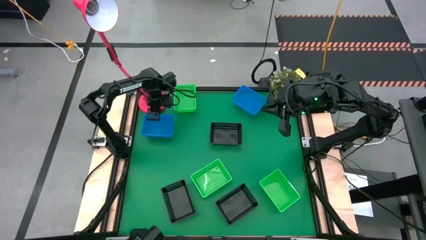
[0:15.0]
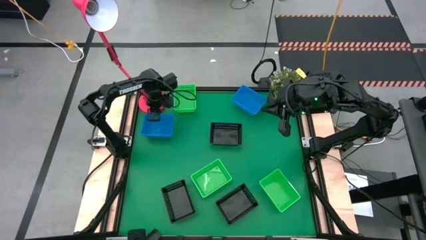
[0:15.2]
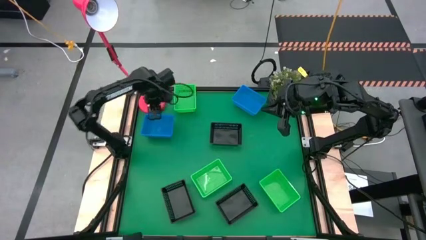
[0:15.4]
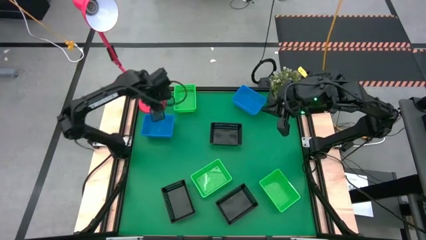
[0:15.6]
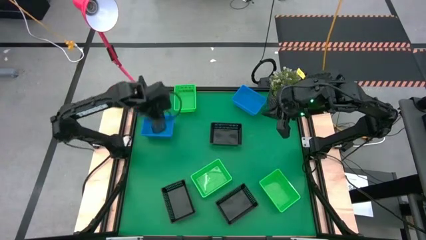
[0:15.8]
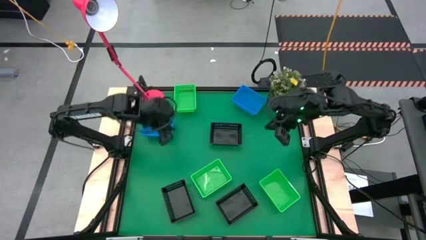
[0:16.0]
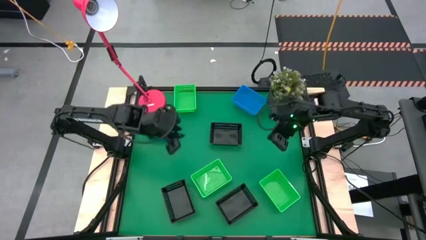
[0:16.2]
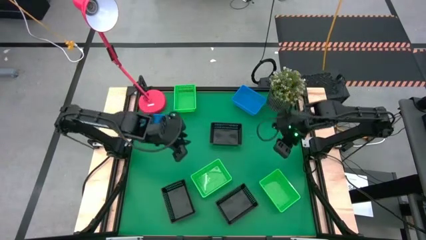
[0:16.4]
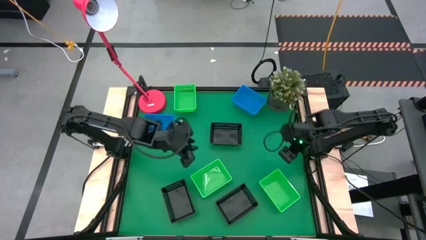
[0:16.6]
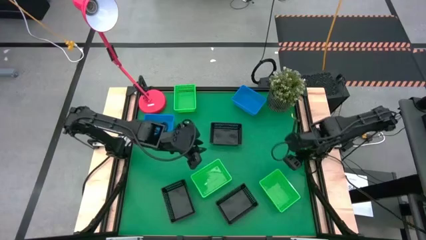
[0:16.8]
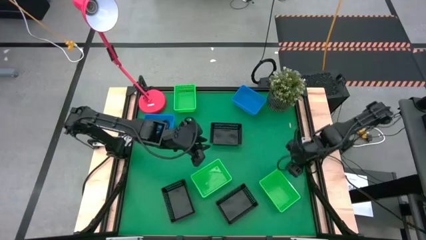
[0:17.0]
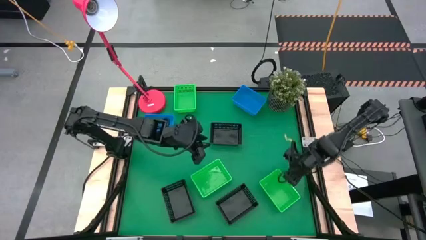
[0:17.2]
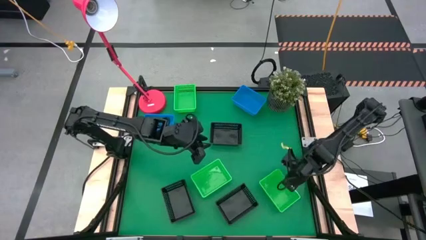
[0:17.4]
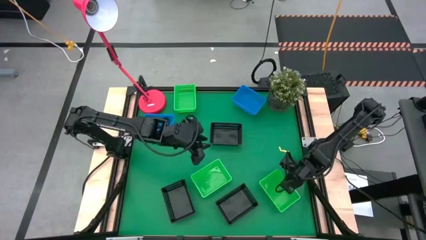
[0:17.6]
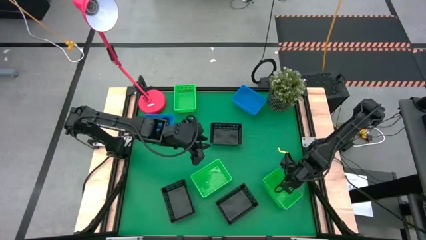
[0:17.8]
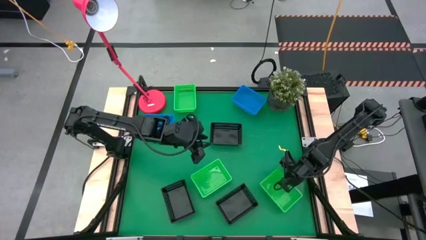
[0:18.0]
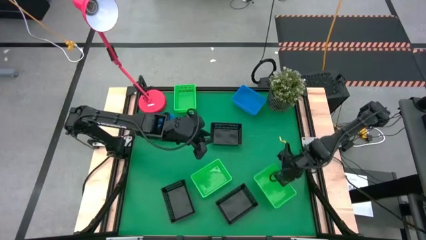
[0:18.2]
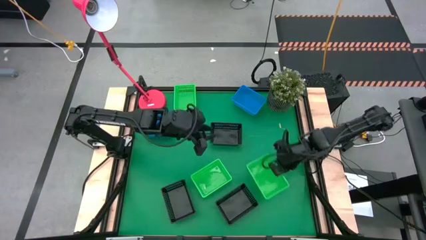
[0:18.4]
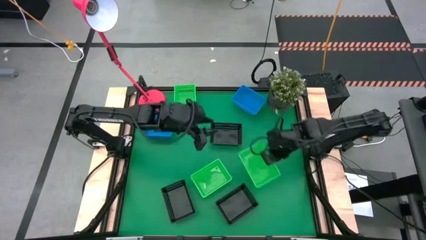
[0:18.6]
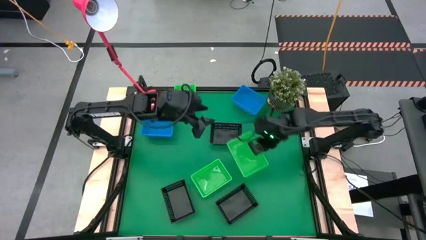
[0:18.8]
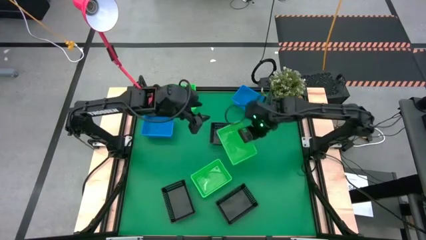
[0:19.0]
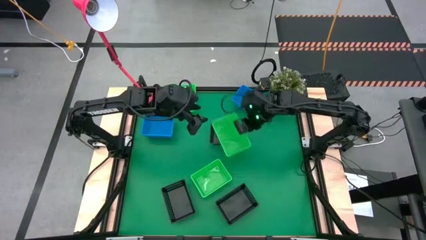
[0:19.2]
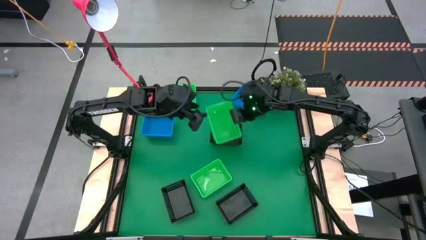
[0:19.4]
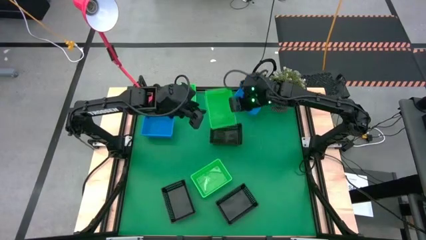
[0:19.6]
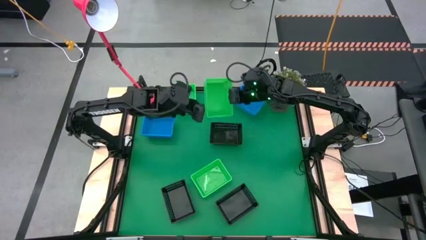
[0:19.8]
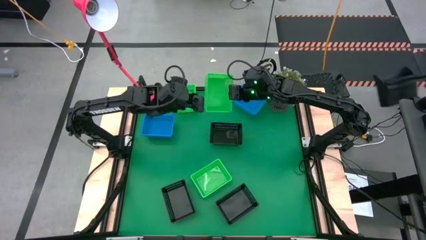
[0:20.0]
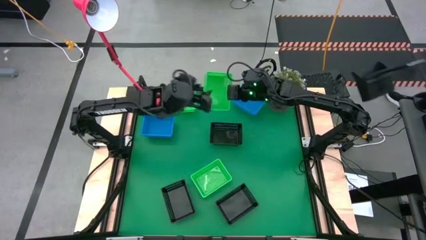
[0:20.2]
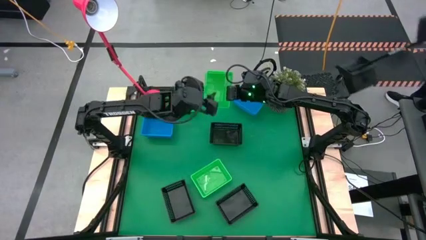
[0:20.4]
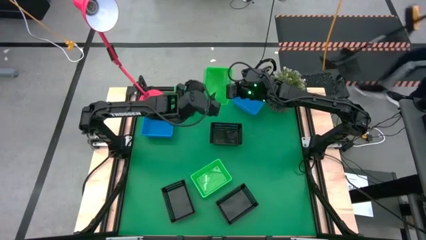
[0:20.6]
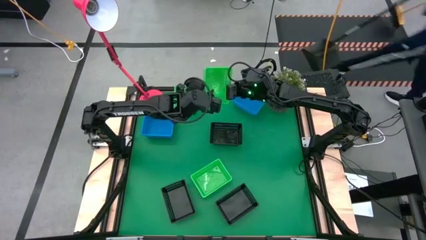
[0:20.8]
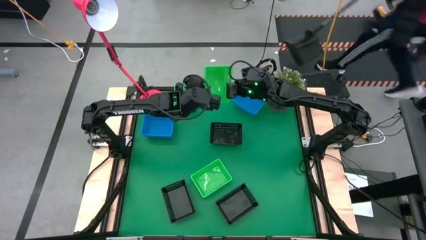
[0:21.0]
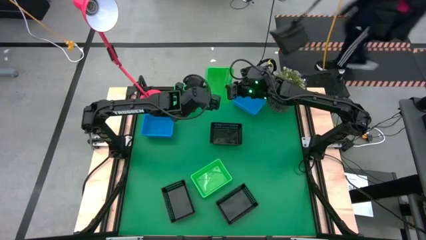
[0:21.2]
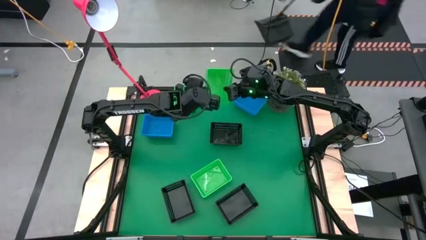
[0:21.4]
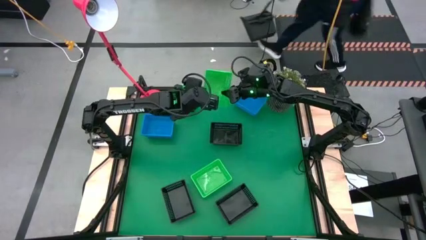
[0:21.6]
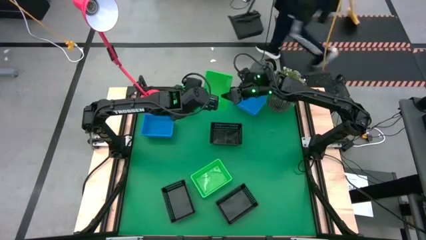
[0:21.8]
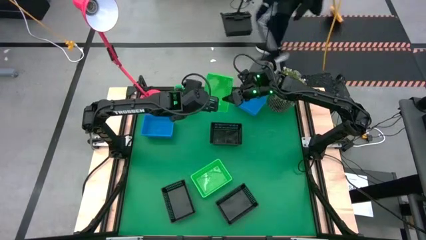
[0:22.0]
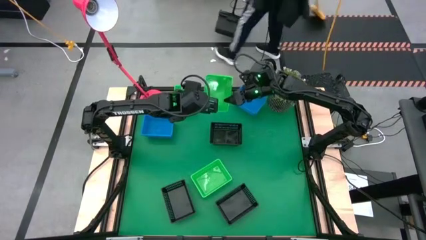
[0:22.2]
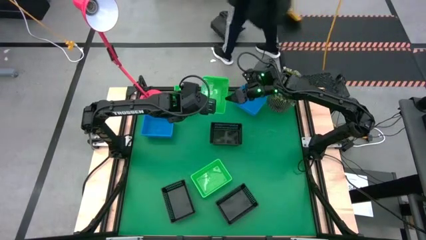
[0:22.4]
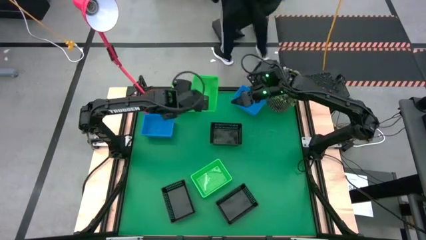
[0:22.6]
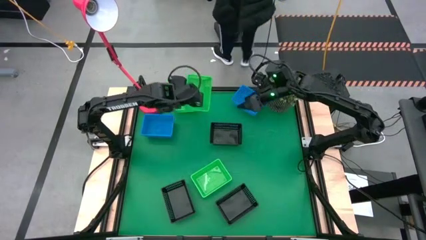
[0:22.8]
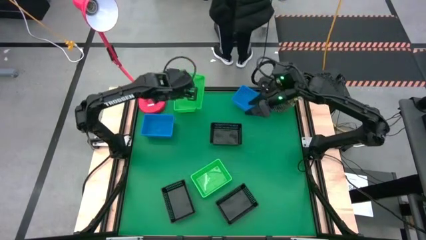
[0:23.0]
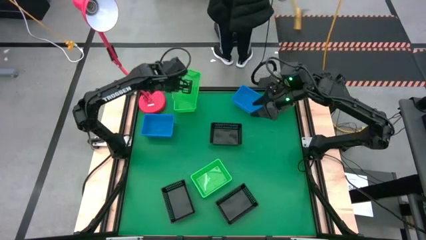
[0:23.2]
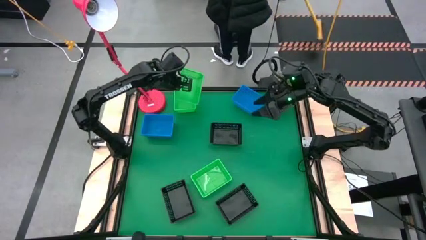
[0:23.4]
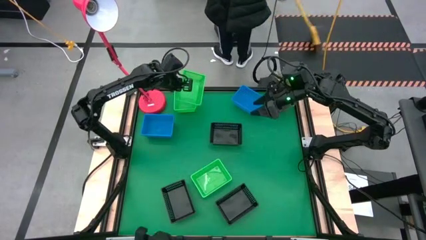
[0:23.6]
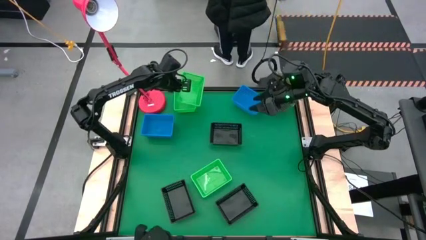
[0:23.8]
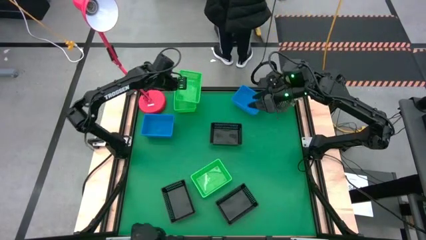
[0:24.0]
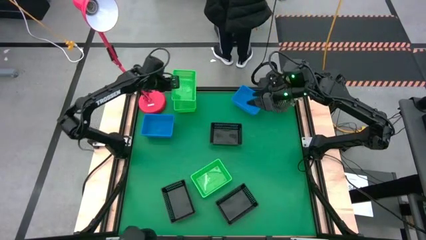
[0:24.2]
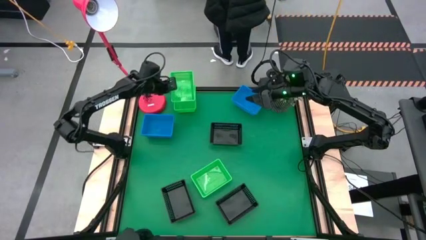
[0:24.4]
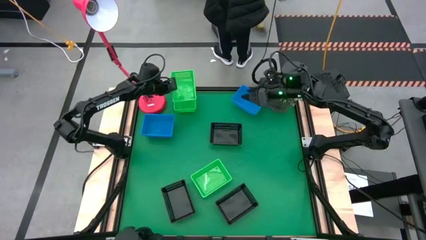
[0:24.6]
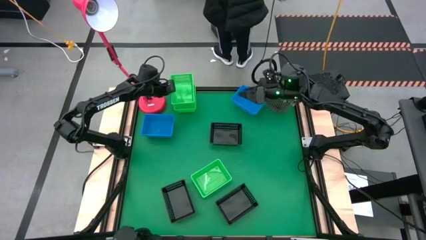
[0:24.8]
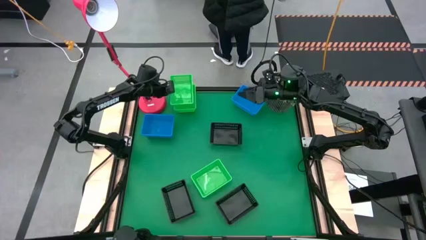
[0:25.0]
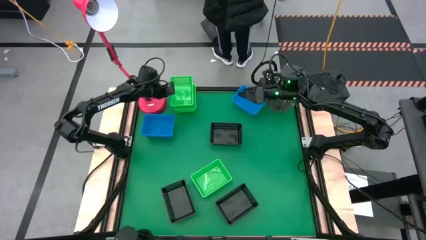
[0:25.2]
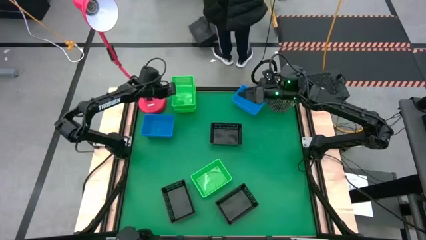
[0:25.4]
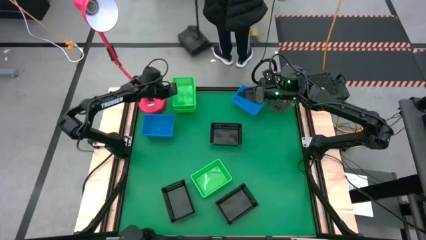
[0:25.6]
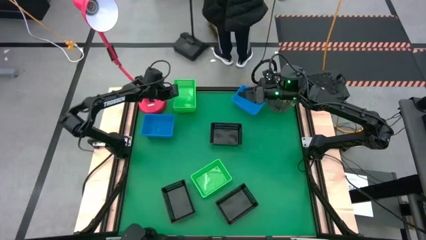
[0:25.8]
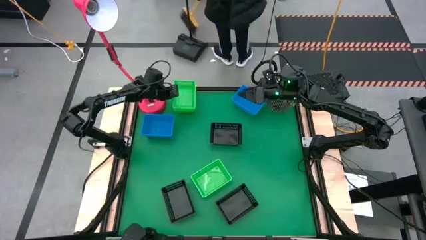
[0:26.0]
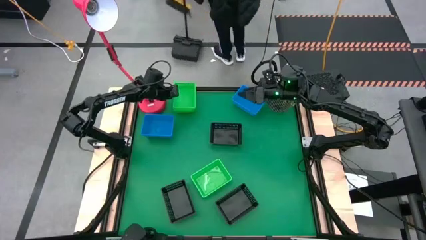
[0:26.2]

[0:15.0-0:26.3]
Stack the bottom right green bin on the top green bin

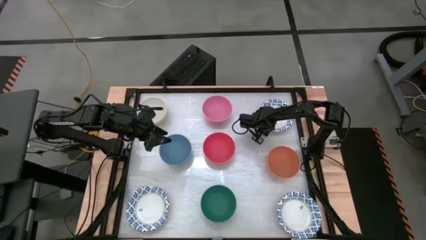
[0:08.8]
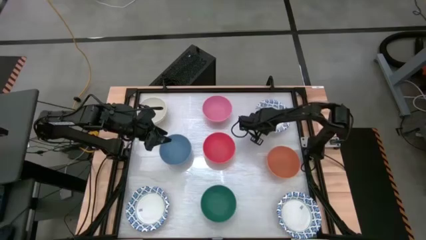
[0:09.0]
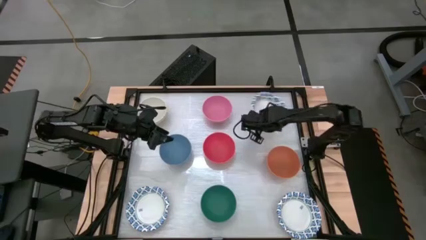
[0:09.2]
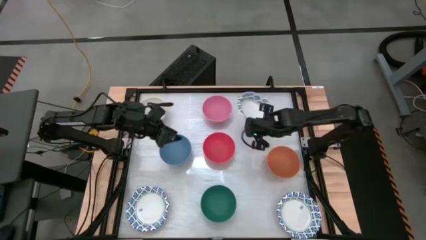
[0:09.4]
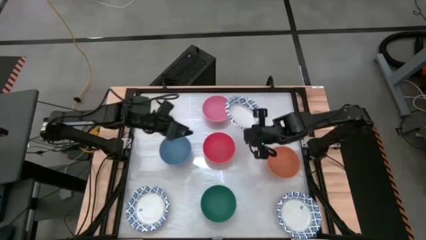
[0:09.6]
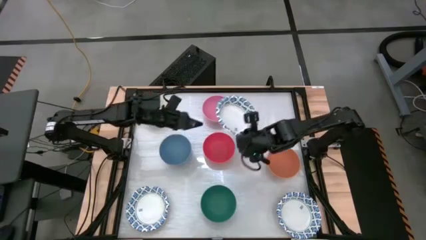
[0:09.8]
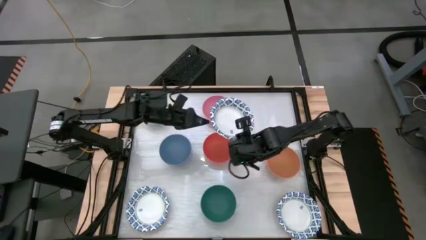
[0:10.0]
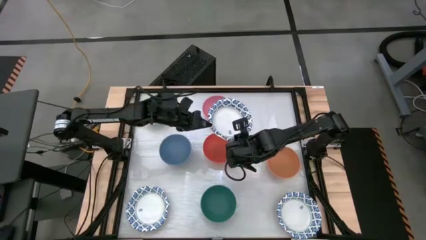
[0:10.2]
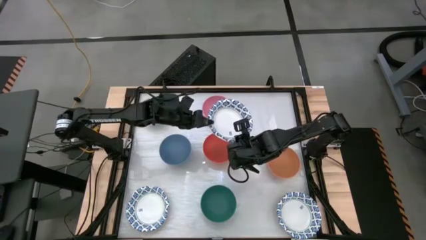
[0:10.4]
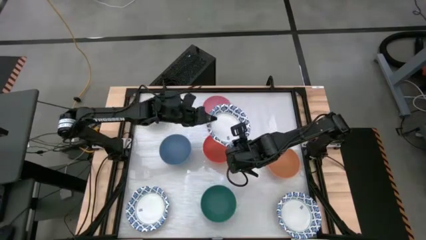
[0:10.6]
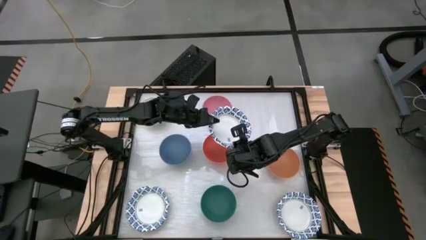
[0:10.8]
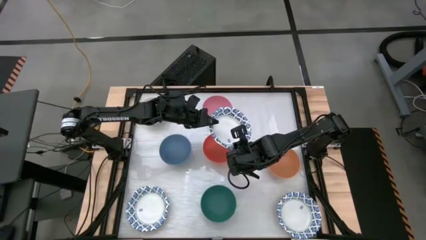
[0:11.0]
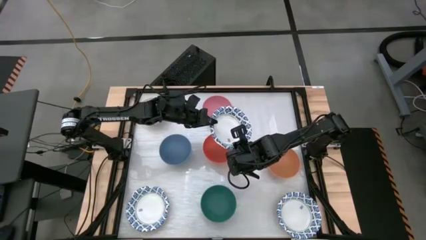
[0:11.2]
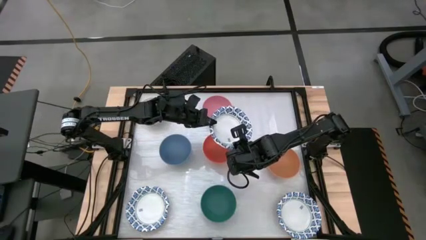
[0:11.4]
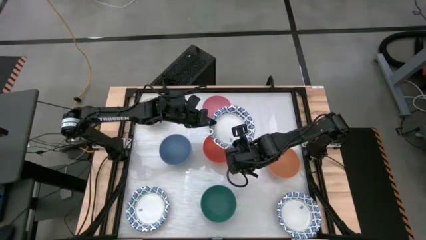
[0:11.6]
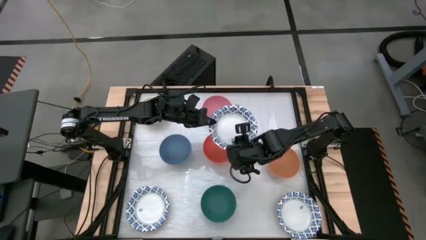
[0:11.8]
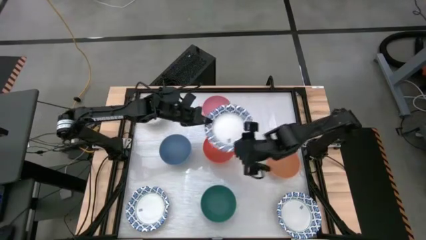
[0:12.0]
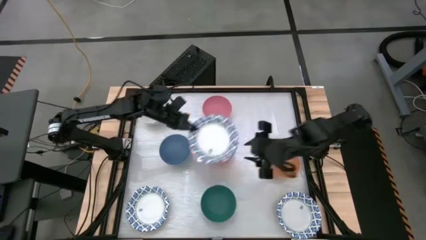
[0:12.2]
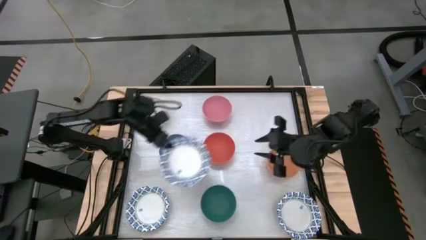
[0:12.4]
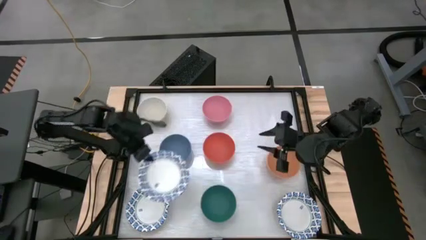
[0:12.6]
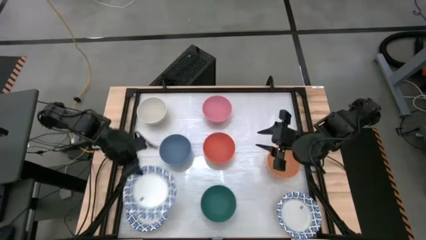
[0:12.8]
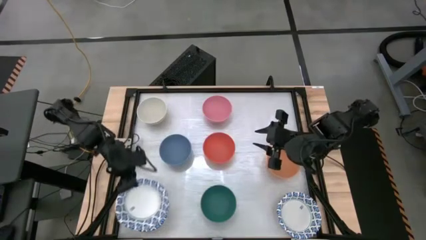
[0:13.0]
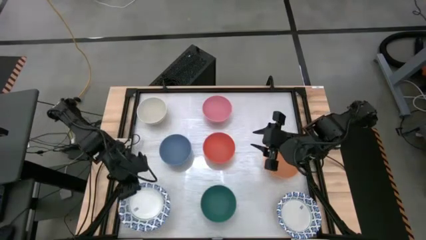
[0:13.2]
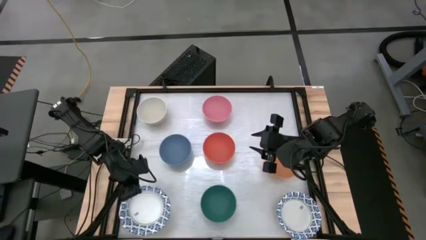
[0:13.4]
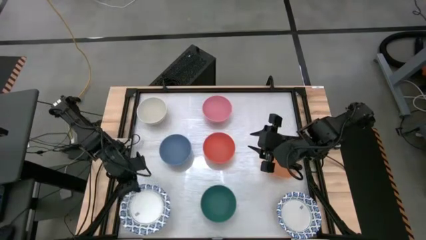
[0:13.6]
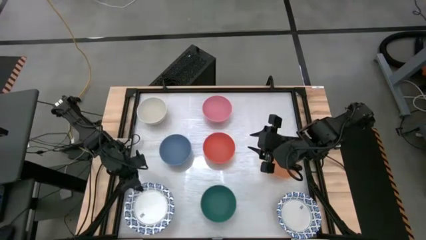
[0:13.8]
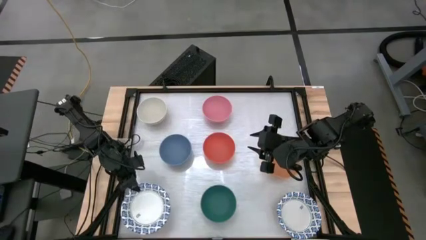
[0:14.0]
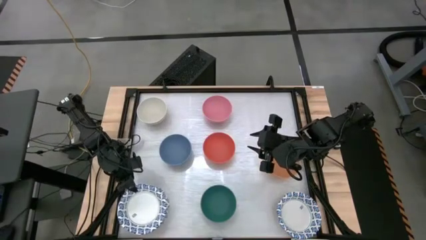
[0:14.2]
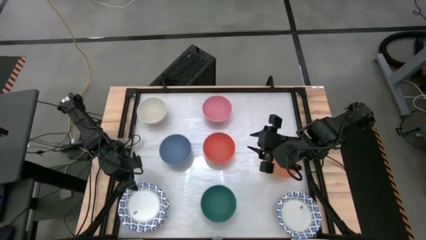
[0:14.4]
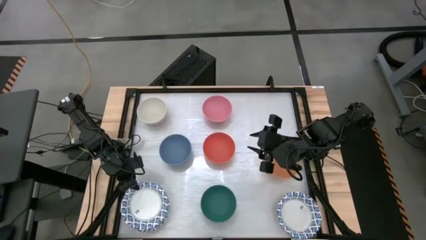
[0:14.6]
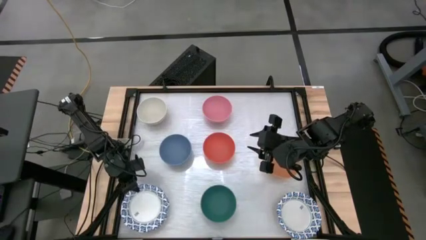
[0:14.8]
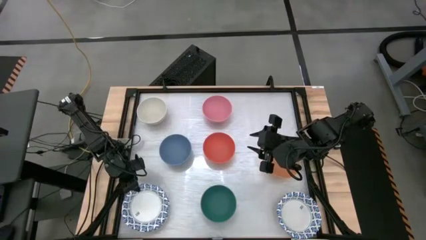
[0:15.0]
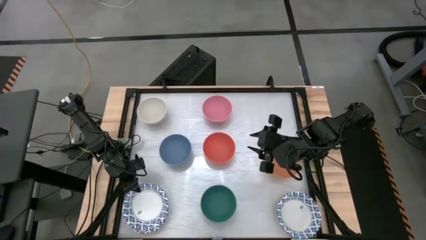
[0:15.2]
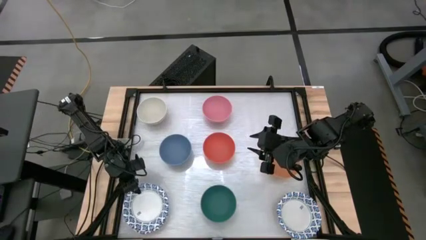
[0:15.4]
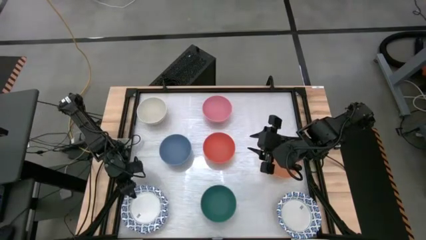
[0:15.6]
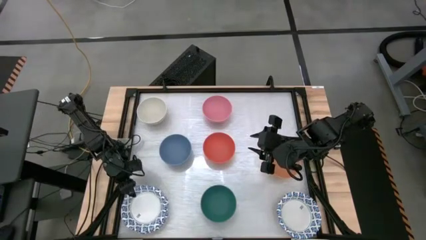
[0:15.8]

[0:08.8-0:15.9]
Stack the top right white patterned bowl on top of the left white patterned bowl
